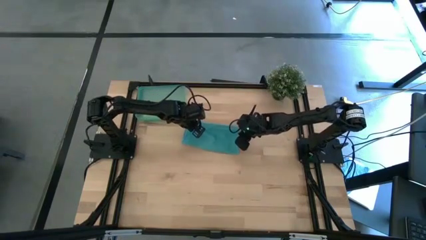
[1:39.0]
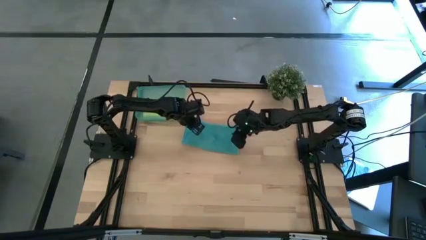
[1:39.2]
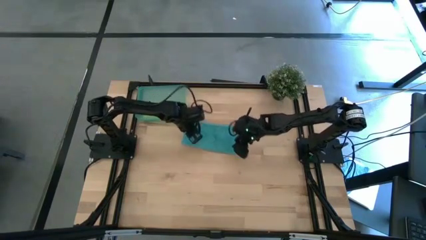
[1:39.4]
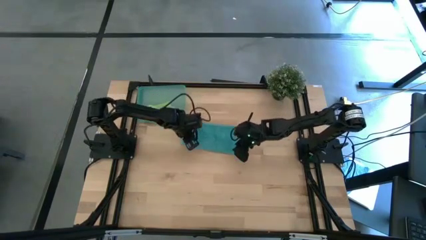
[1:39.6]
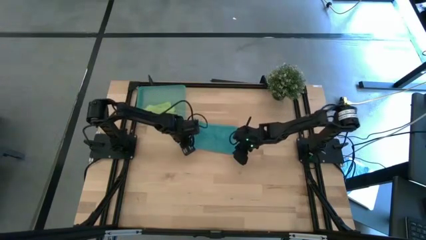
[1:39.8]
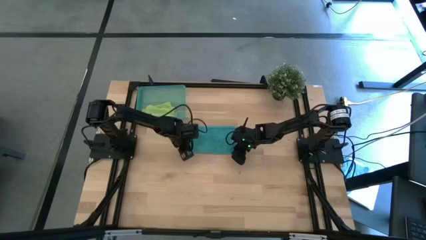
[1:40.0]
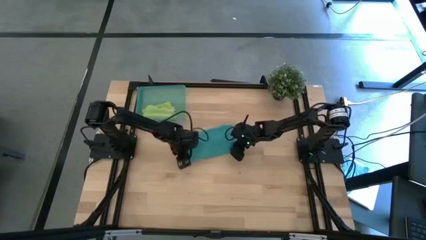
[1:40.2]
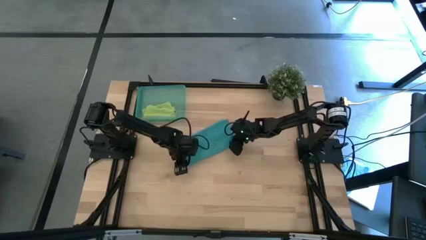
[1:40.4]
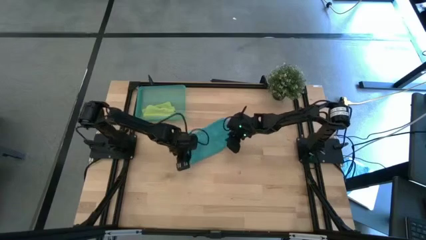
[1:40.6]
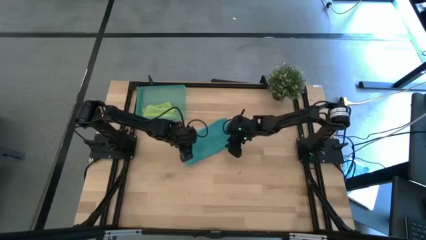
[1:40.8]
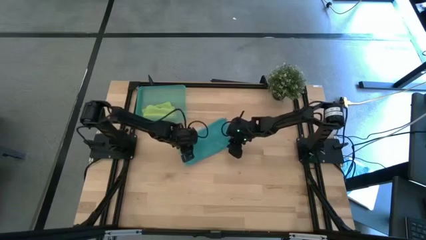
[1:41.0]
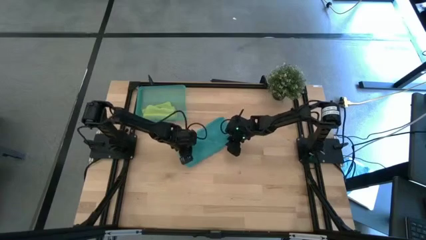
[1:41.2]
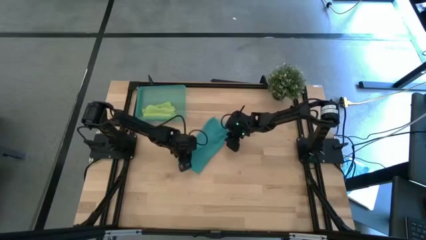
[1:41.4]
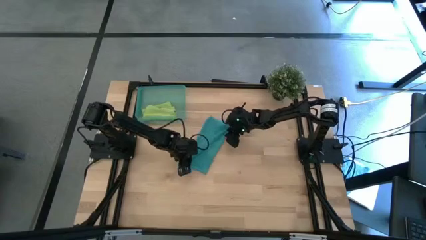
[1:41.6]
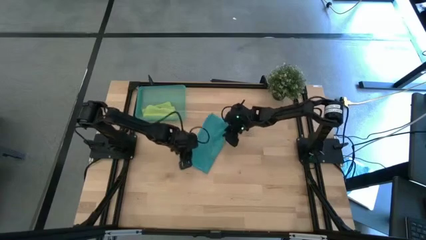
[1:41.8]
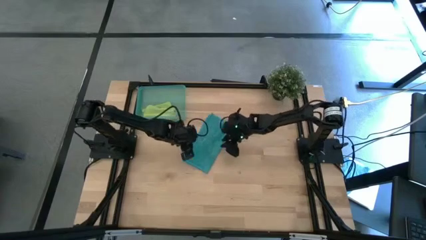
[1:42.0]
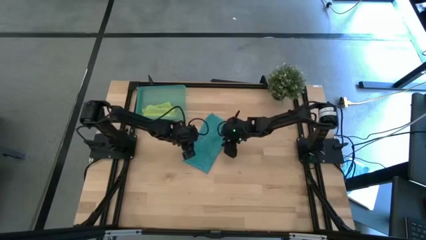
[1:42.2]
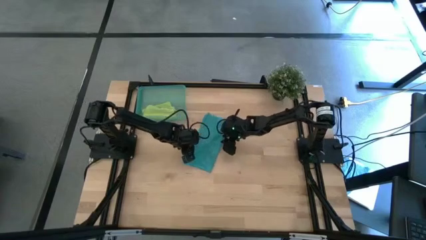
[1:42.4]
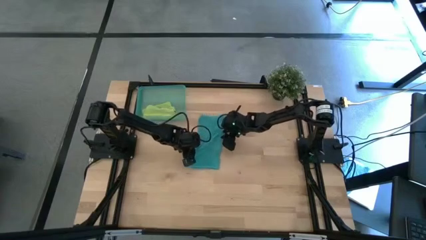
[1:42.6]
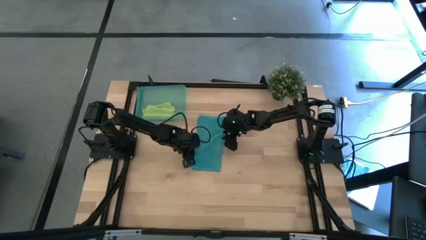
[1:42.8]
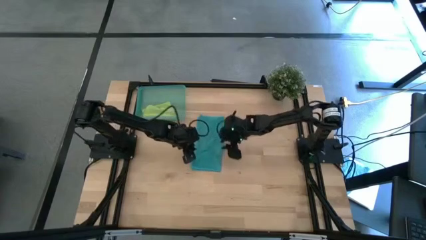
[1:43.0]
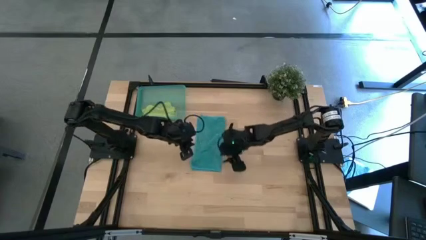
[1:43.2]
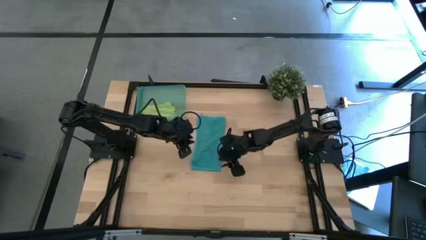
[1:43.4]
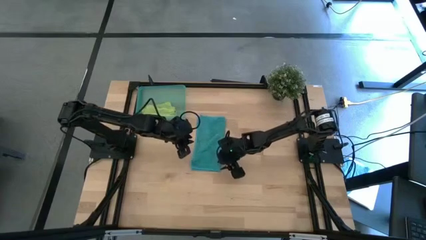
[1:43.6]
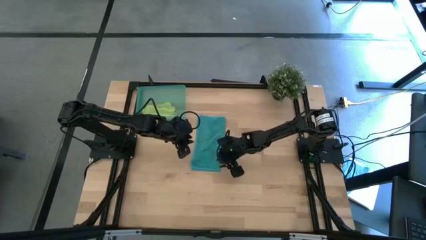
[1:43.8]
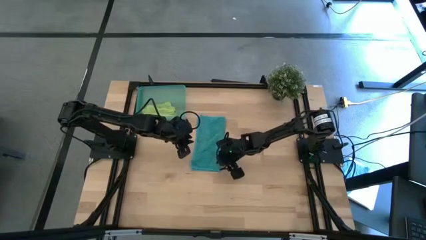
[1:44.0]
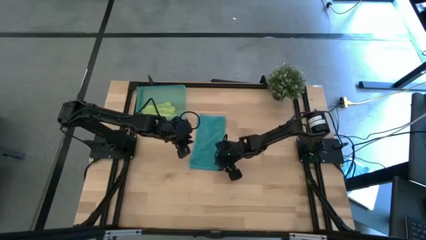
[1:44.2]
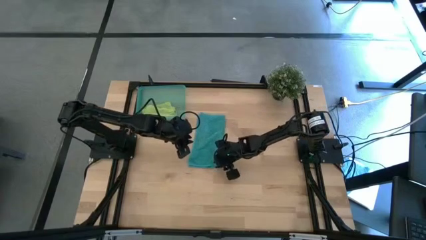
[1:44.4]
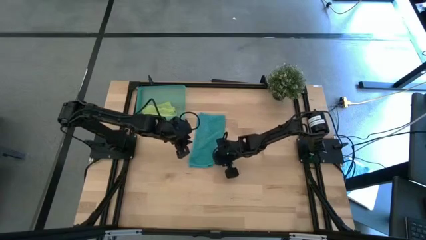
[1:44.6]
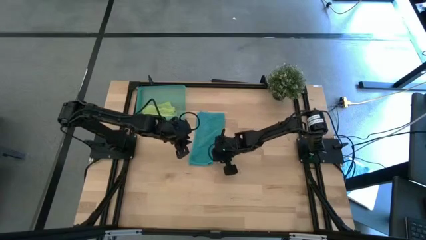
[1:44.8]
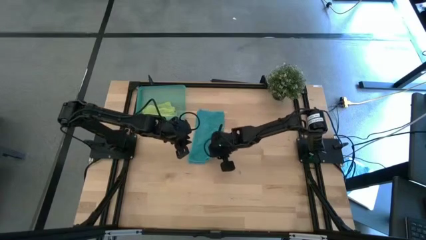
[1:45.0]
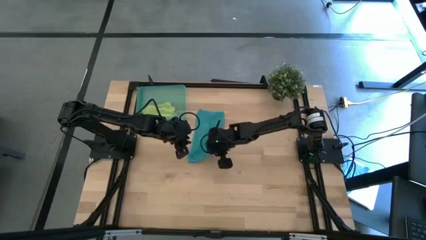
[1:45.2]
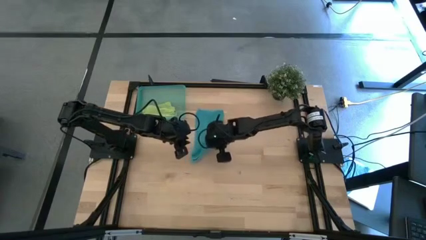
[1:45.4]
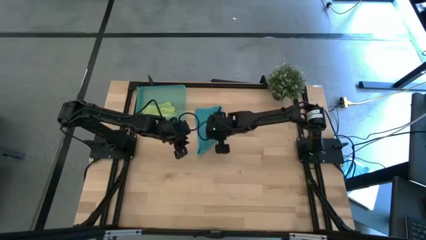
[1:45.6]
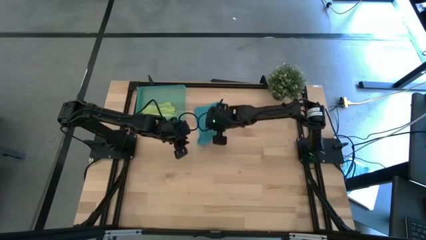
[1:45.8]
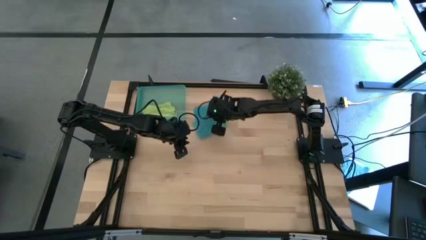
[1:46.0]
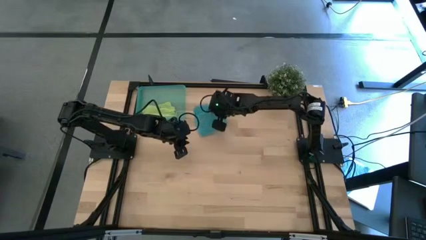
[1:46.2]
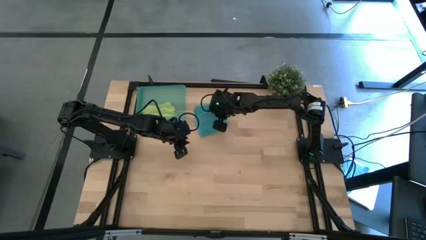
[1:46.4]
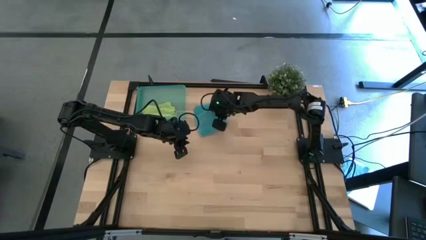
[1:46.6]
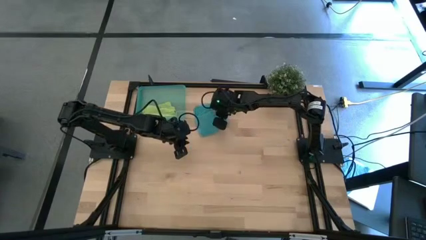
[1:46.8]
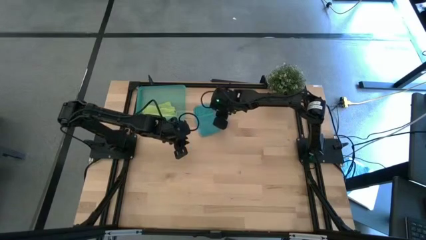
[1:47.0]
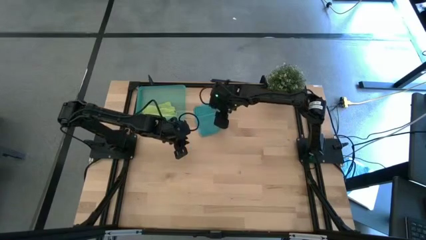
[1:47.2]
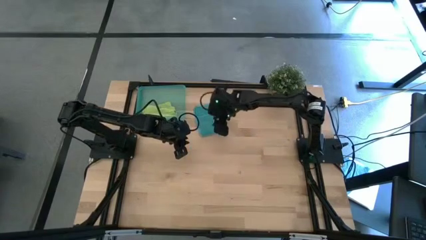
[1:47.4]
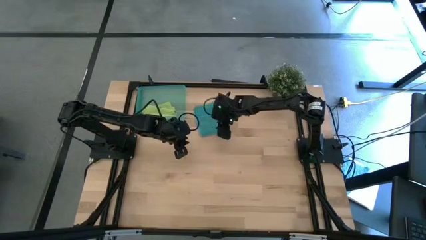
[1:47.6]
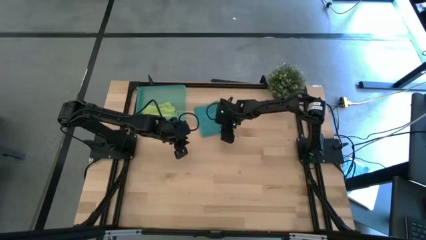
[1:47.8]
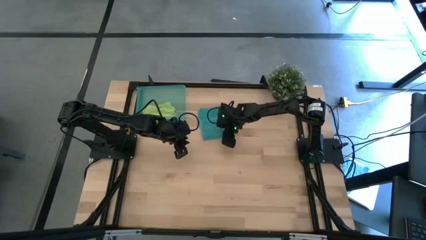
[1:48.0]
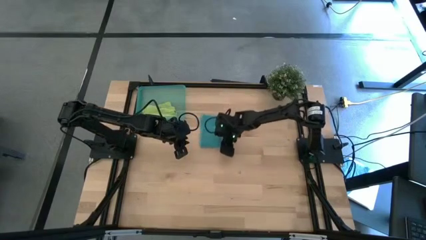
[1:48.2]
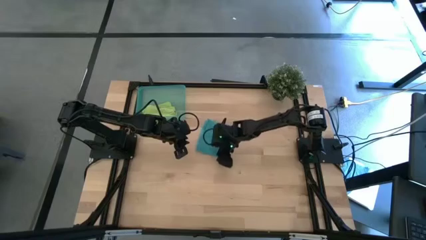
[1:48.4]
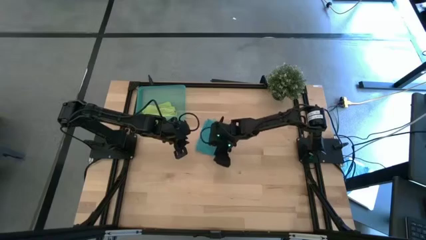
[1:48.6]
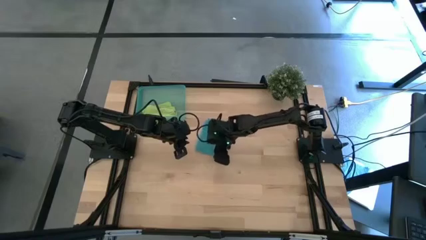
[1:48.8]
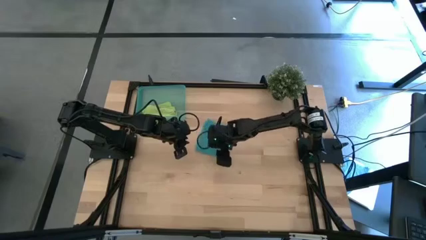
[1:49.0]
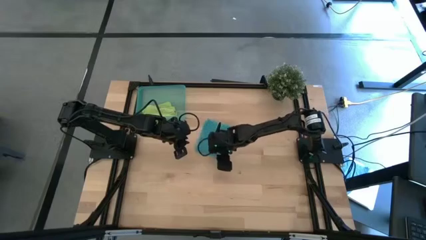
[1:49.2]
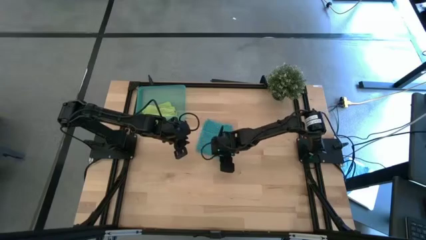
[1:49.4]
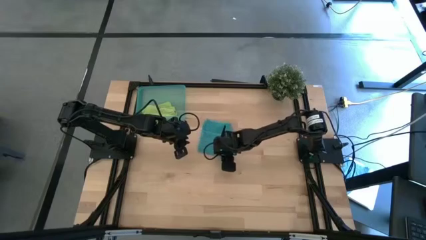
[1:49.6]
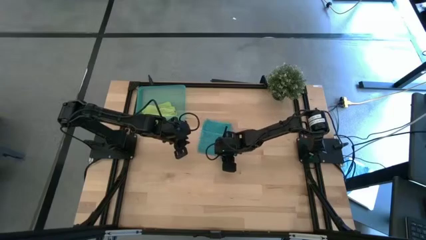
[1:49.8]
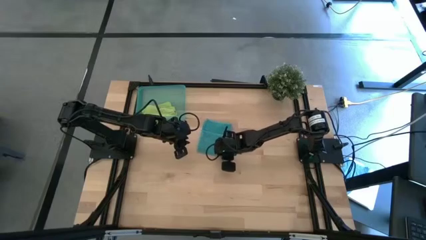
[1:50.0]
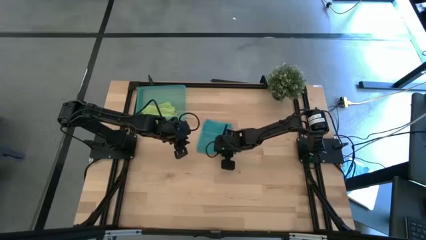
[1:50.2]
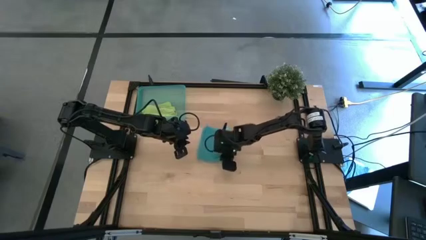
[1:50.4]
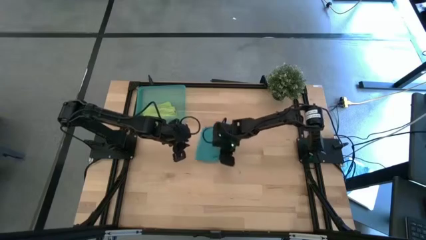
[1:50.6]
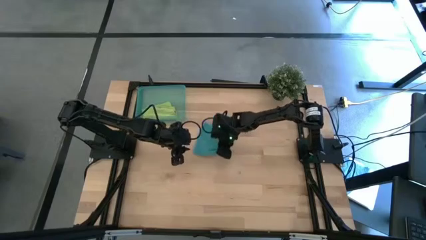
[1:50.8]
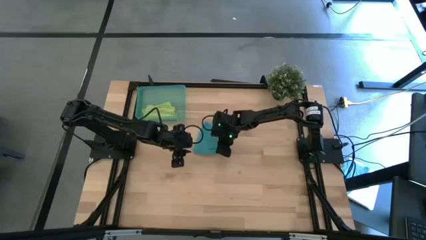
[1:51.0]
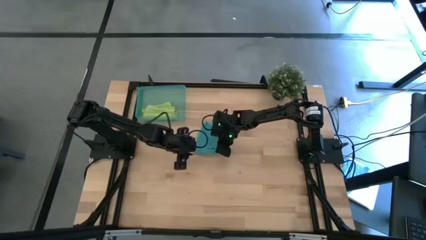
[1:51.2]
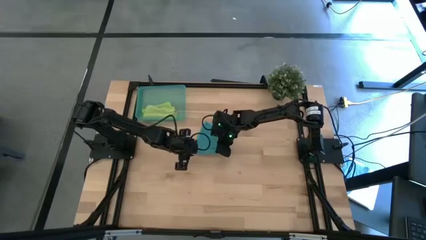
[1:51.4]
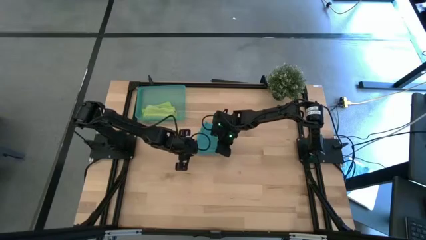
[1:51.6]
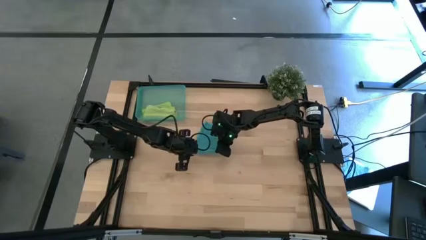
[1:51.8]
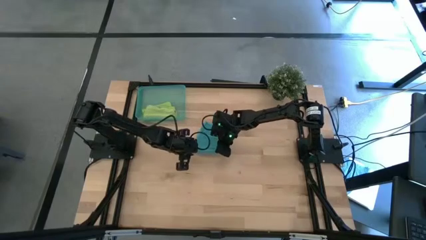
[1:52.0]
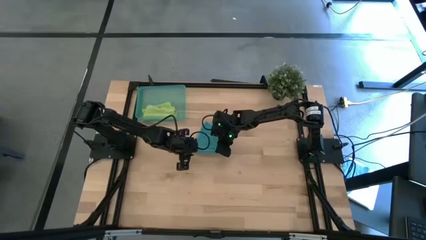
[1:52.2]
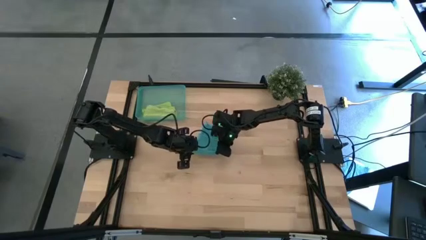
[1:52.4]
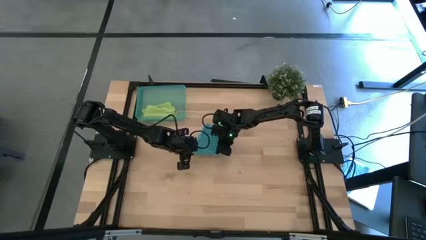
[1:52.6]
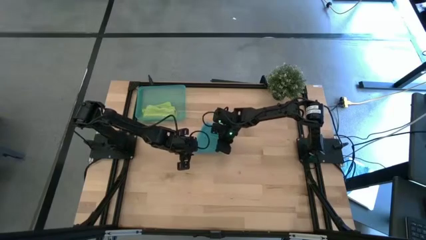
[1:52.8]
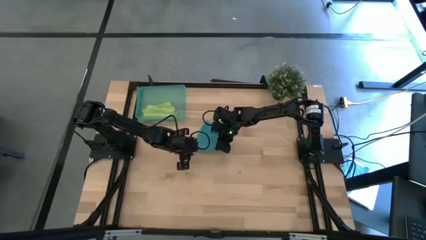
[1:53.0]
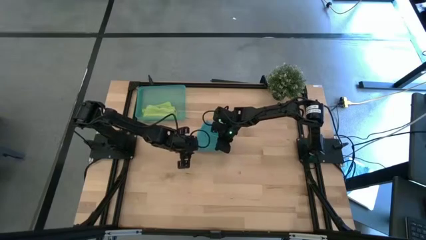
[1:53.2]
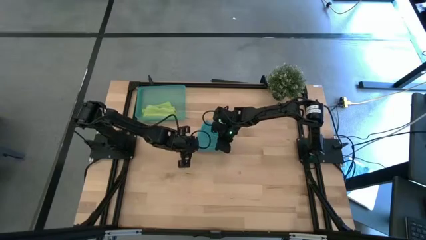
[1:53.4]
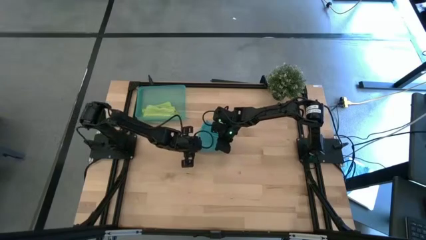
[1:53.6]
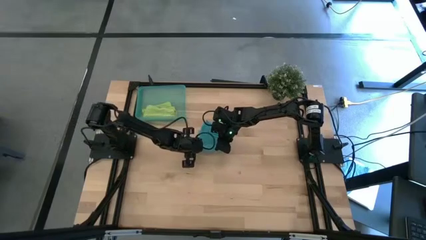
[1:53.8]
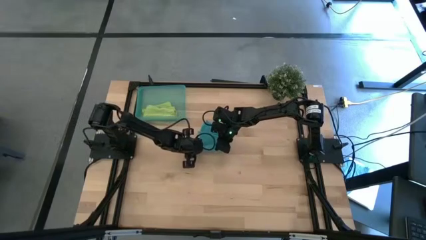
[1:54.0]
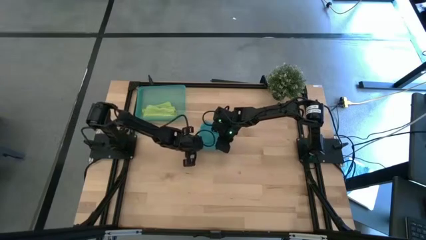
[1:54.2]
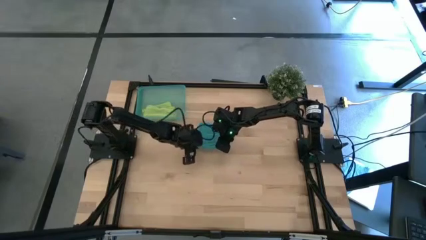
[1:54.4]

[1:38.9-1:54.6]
Task: Roll microfiber towels into tight, uniform cylinder then place into a basket
Roll the blue microfiber cloth

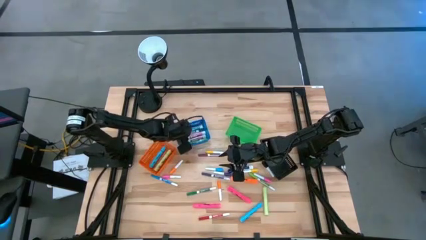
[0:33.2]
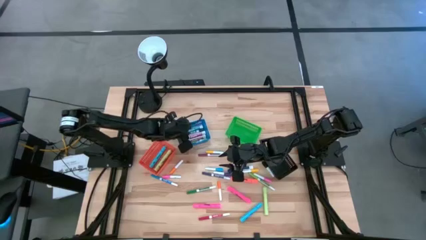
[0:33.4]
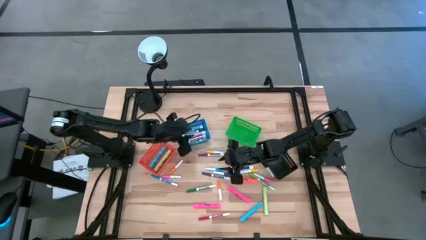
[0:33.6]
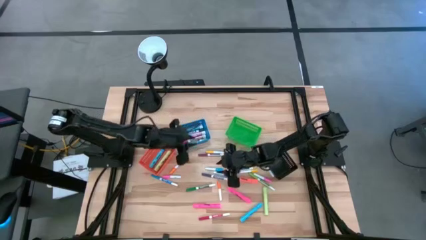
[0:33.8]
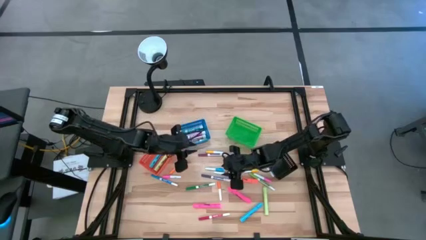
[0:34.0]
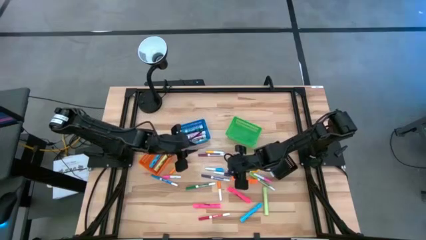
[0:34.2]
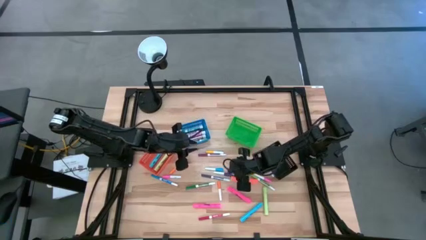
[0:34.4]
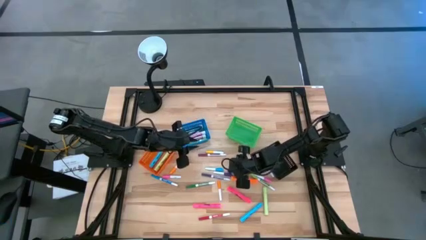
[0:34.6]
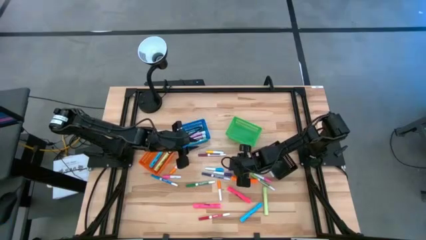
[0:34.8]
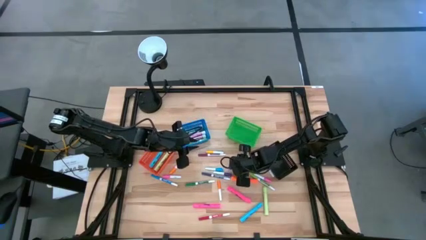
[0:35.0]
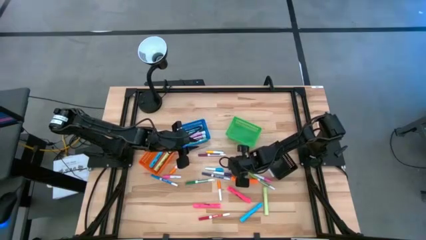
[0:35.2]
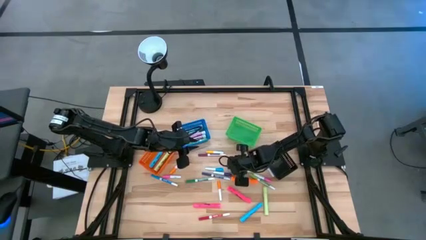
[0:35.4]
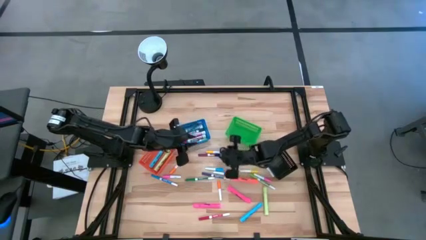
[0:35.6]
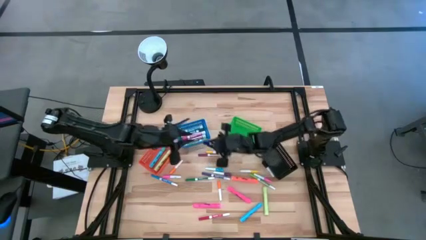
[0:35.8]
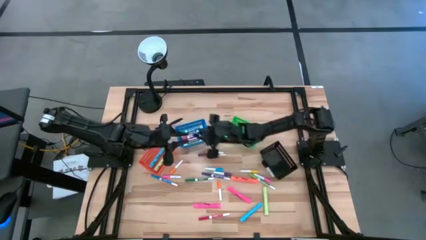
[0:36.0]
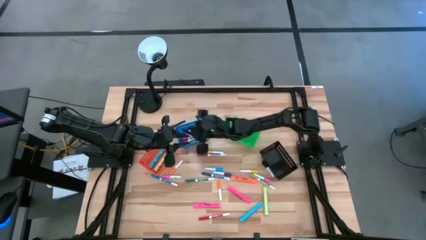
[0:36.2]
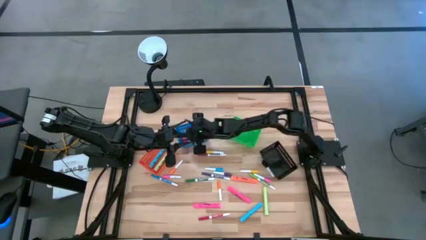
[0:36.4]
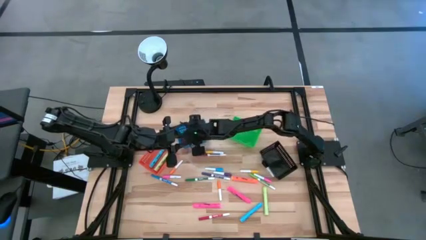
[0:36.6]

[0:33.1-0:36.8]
Task: Pick & Place Markers
Put the top right blue marker pen into the blue basket
